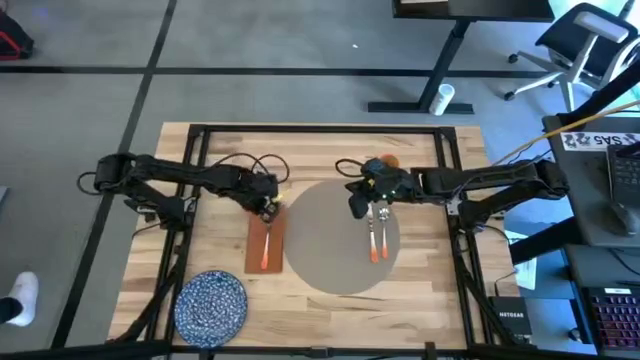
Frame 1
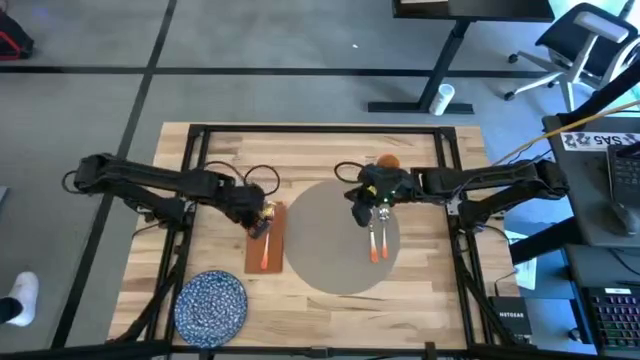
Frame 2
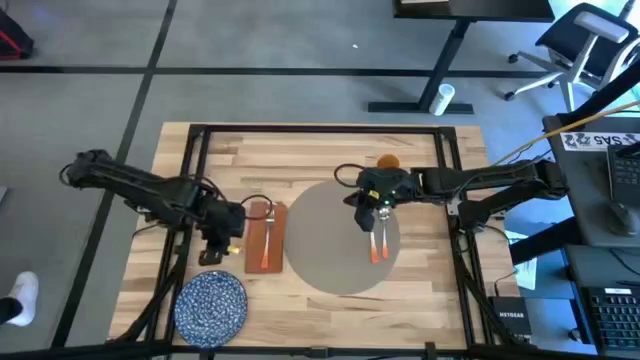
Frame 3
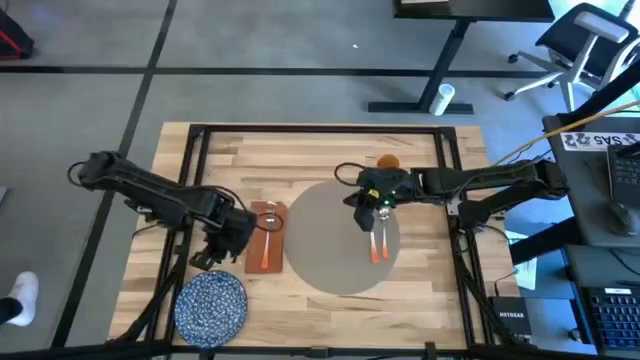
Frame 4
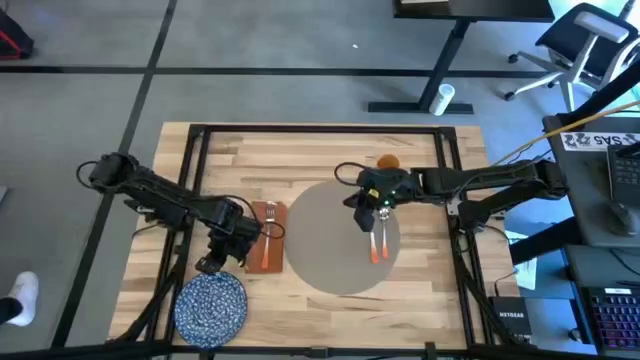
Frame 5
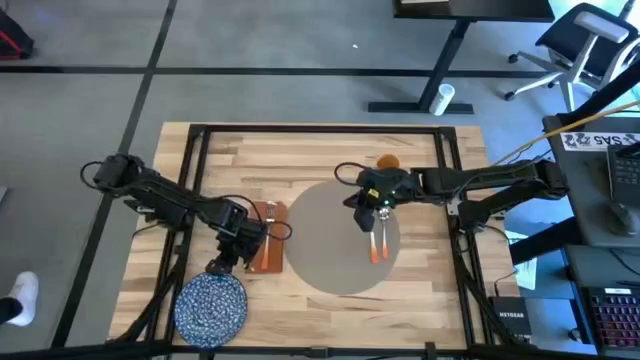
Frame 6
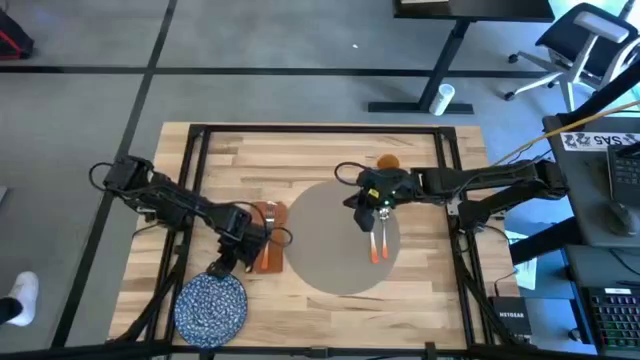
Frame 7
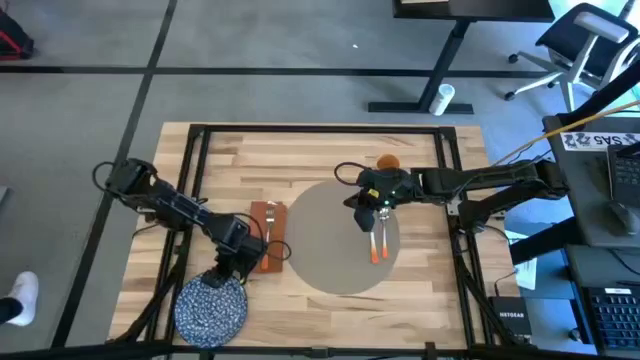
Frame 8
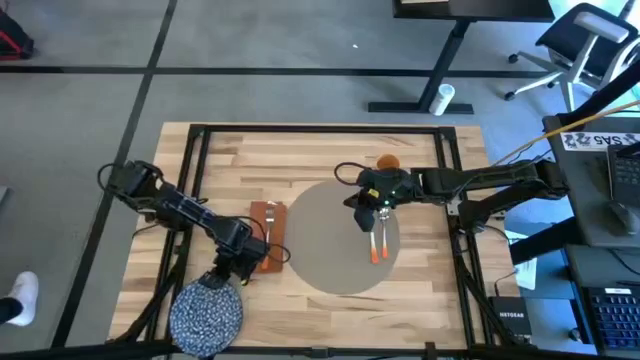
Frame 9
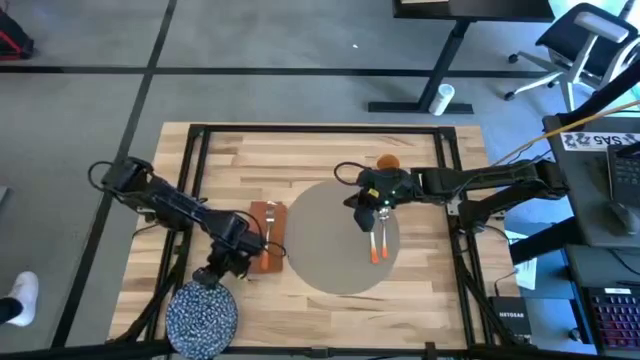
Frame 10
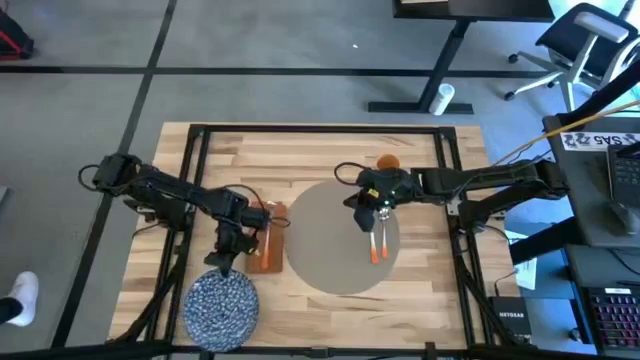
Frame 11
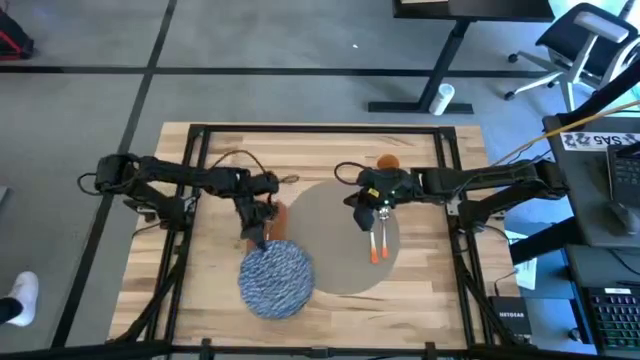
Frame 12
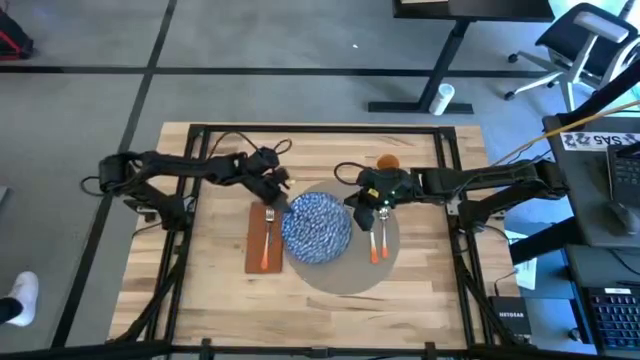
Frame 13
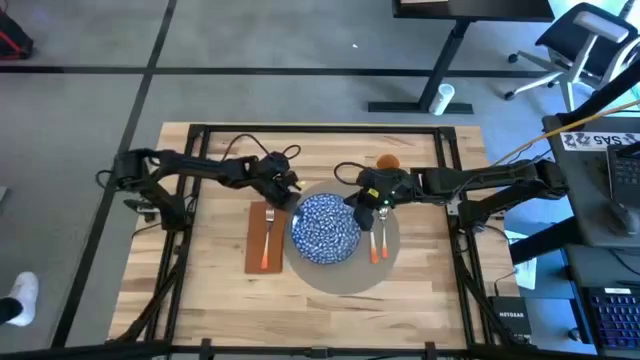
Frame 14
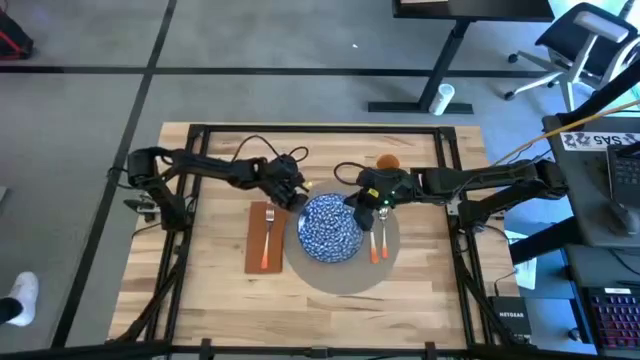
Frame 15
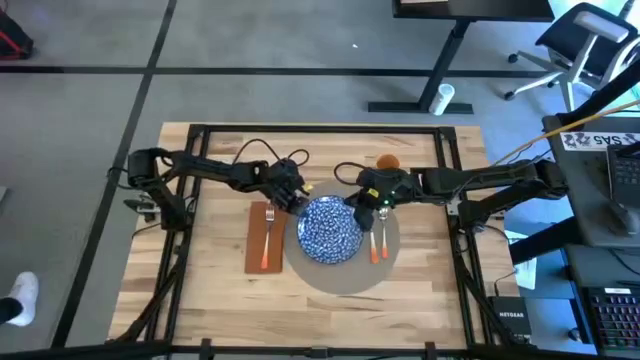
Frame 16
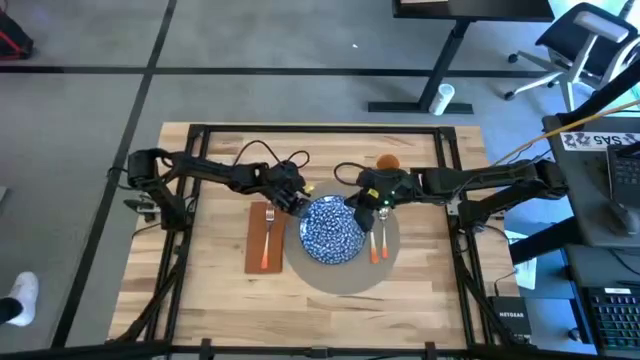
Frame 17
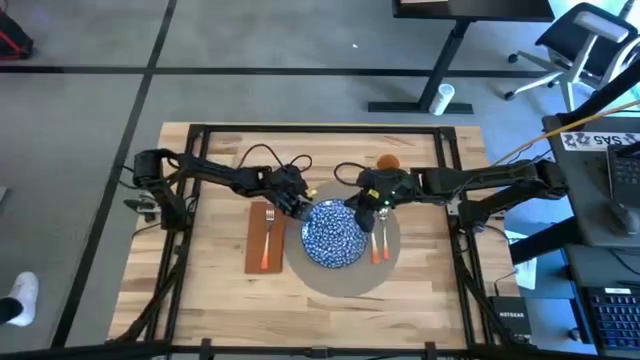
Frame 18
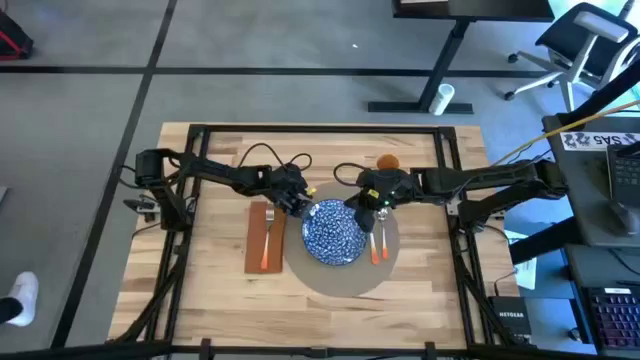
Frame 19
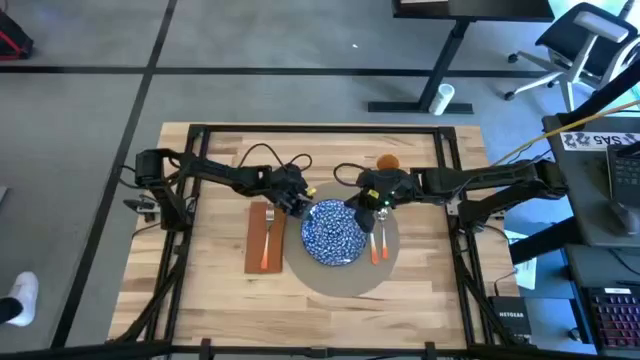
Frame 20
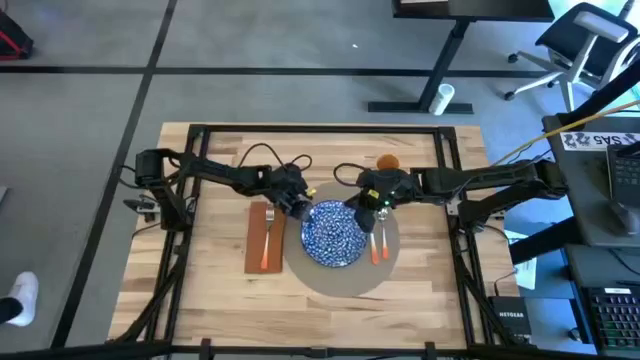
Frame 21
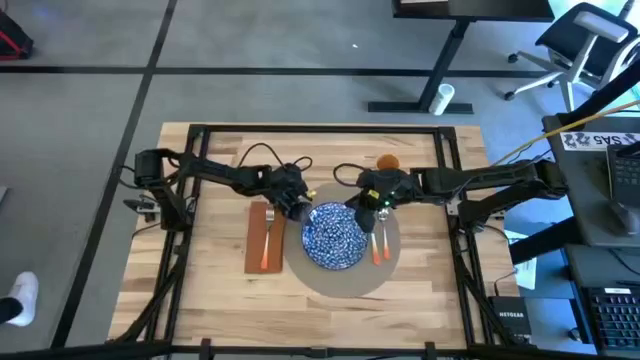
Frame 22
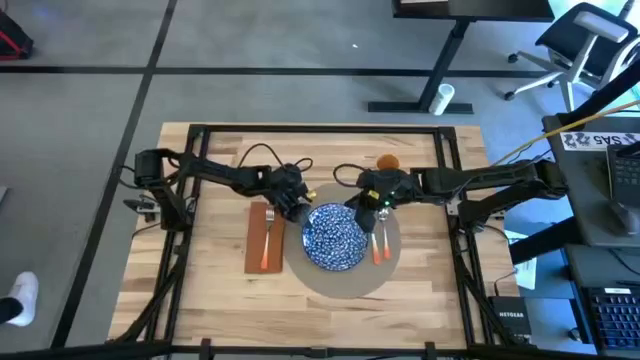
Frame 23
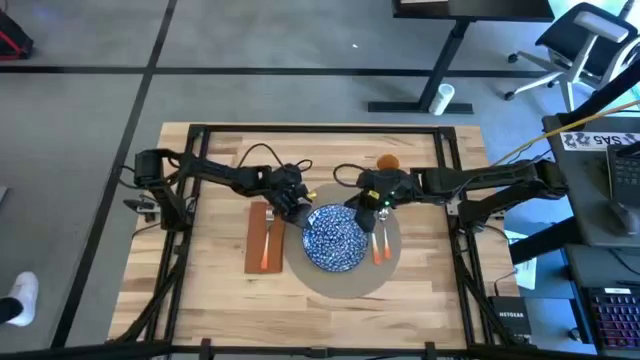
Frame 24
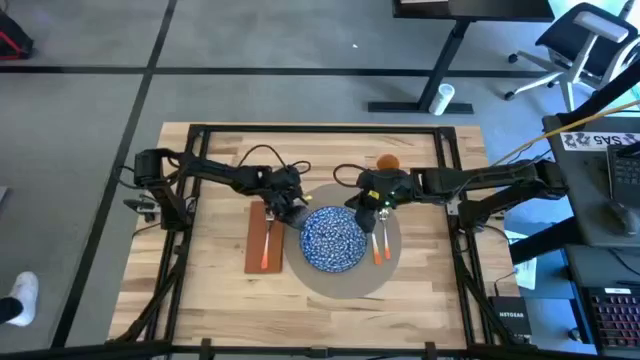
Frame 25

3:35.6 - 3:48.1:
Task: Set table place
Put the blue plate on the gray mat

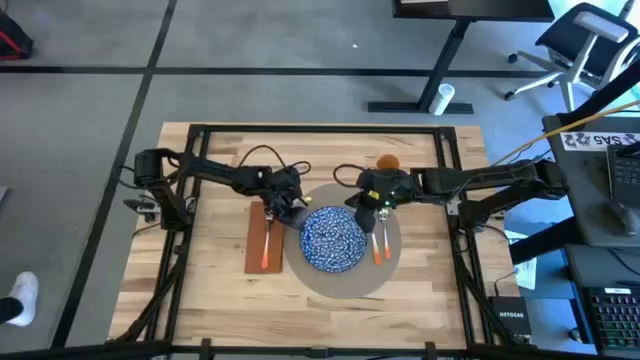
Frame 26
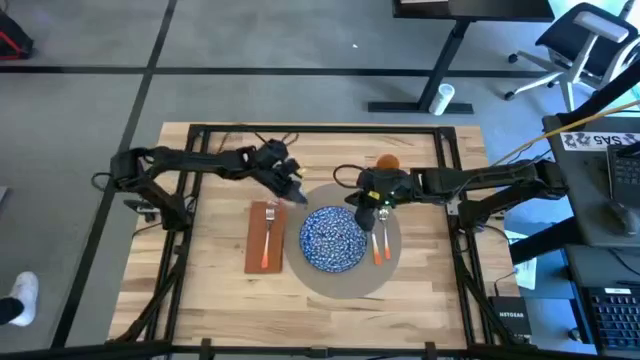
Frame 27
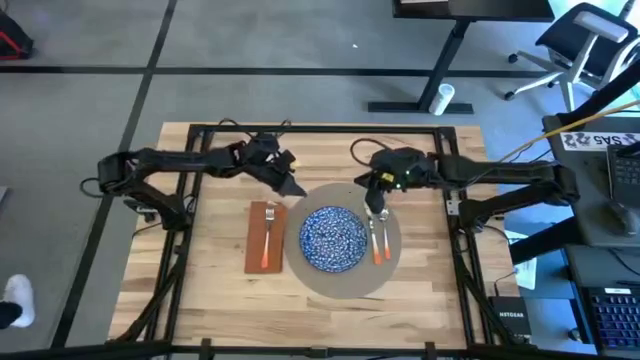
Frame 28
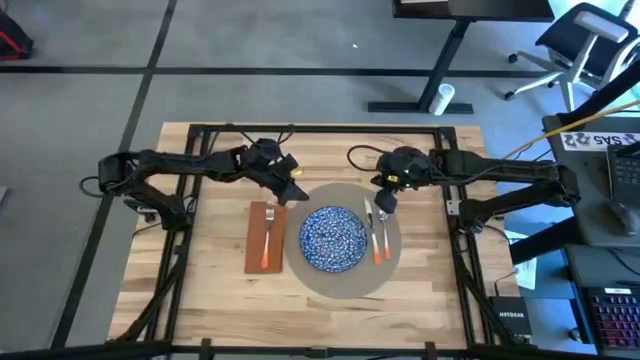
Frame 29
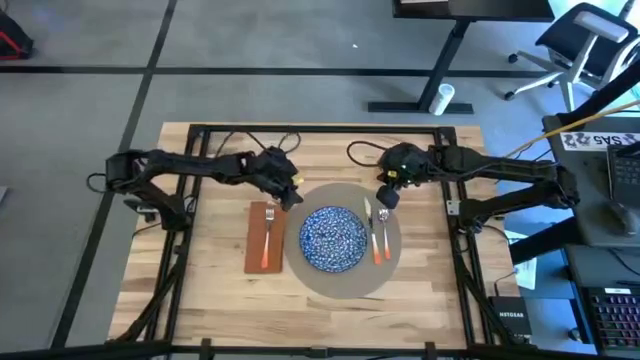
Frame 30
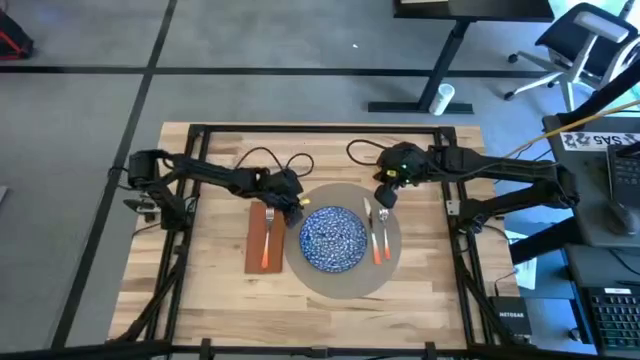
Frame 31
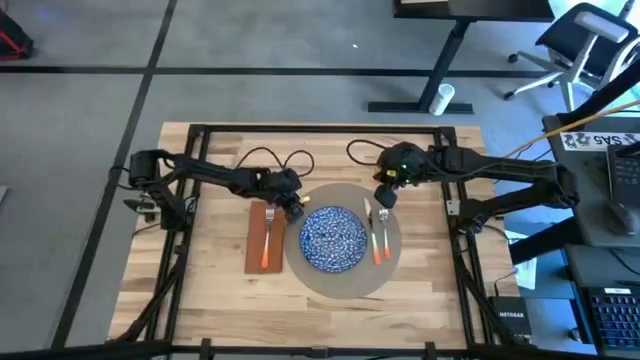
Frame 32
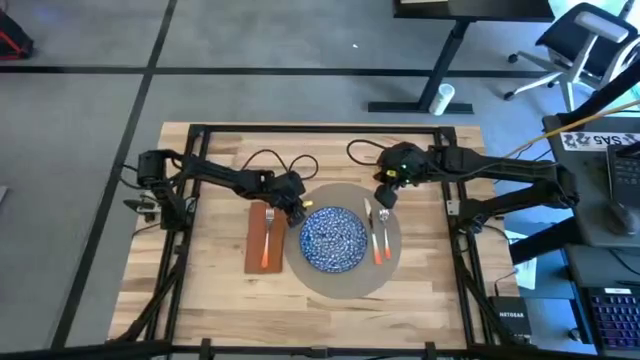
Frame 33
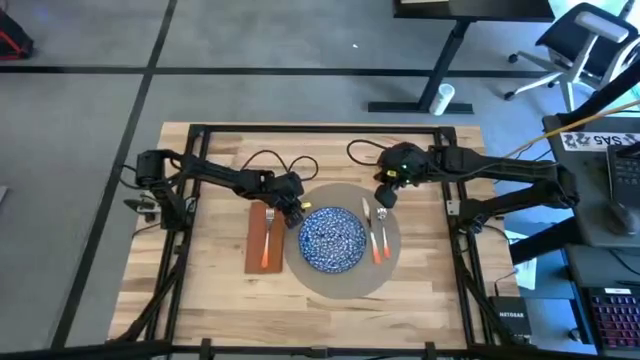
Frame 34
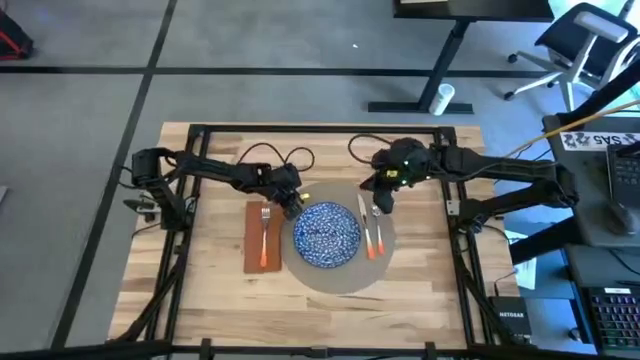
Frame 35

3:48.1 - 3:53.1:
Adjust the gray mat

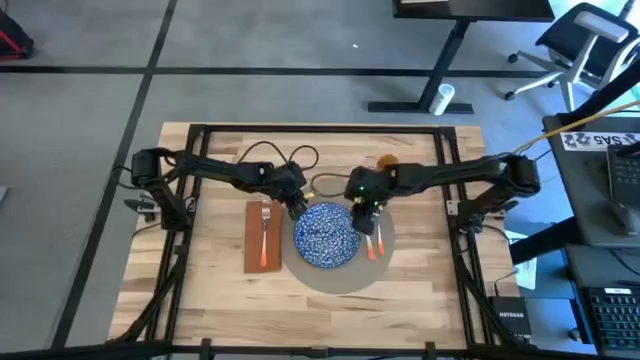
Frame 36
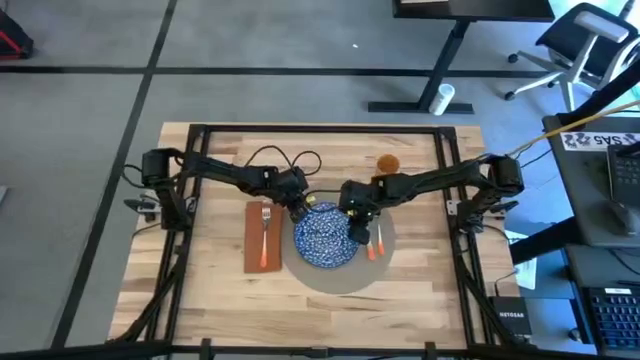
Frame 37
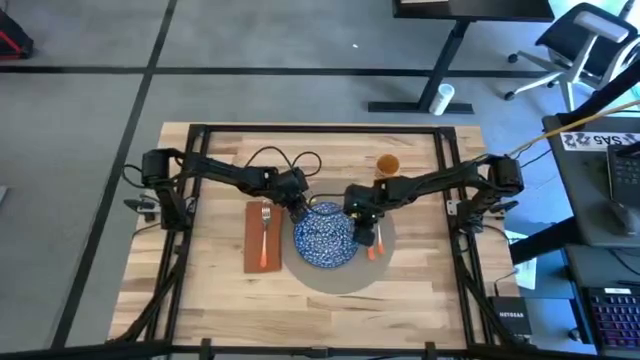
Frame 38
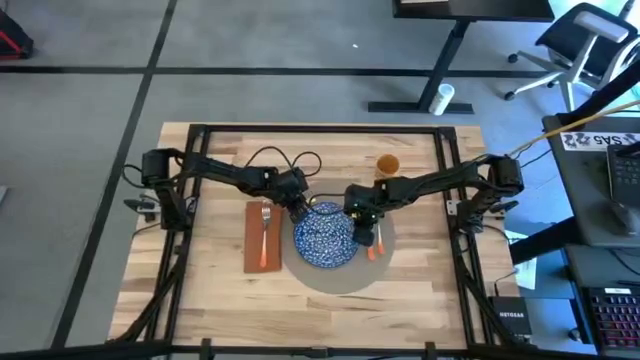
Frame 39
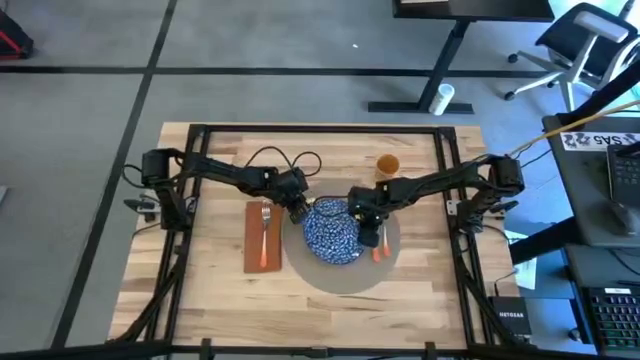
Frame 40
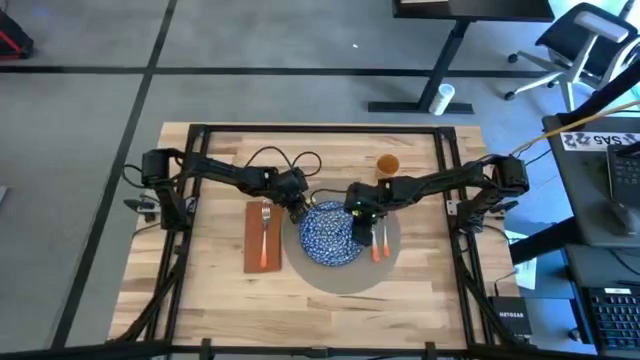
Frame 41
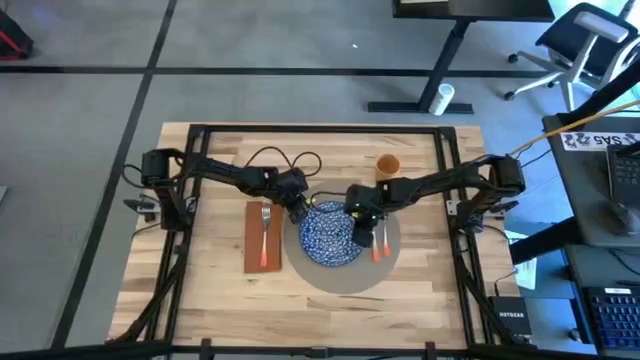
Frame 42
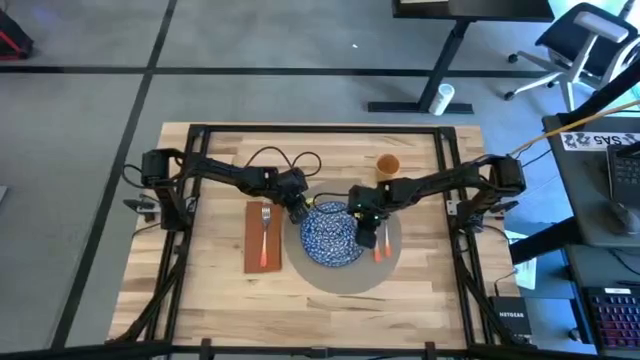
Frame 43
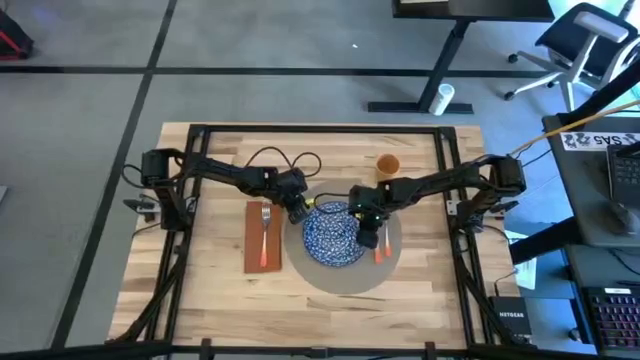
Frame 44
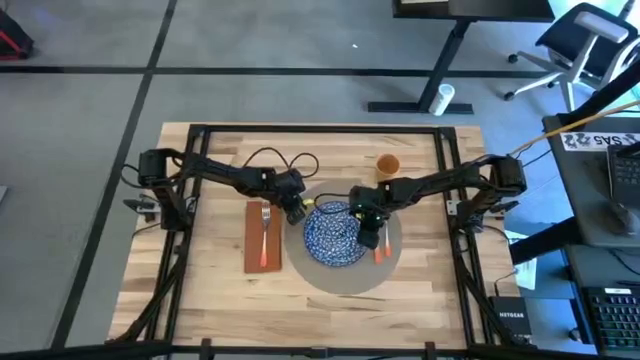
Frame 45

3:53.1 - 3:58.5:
Adjust the blue plate on the gray mat
